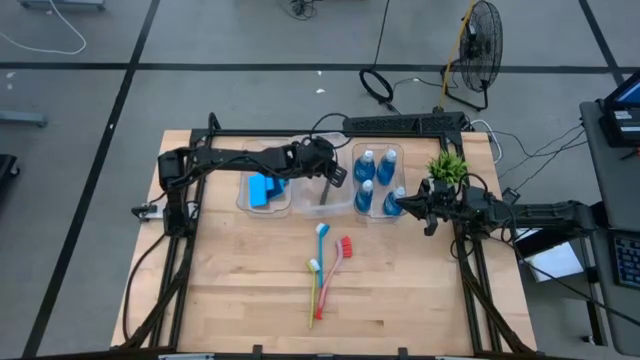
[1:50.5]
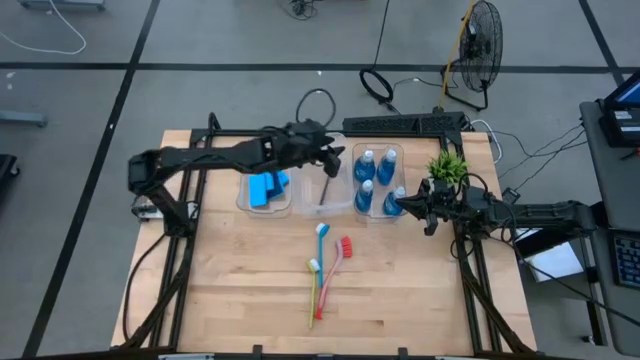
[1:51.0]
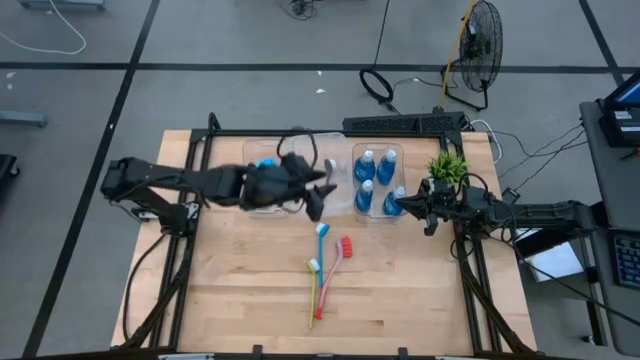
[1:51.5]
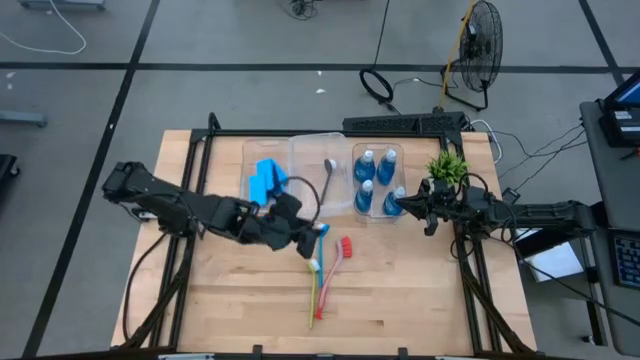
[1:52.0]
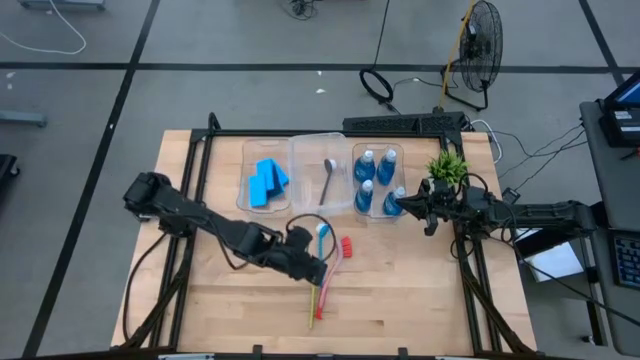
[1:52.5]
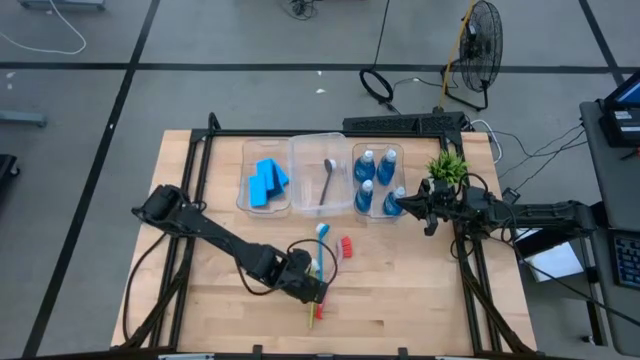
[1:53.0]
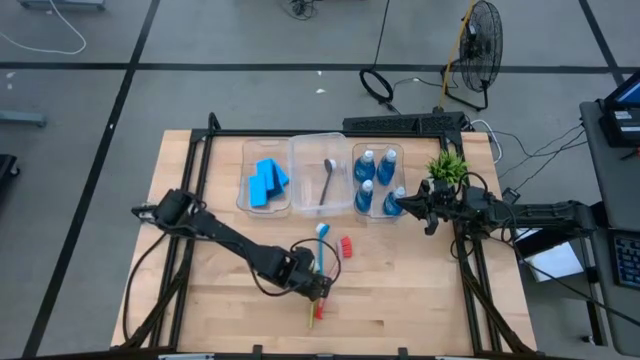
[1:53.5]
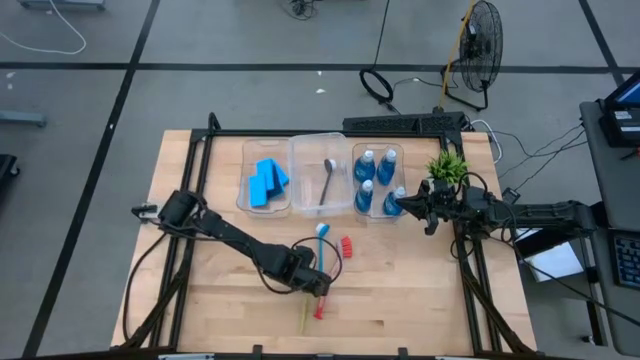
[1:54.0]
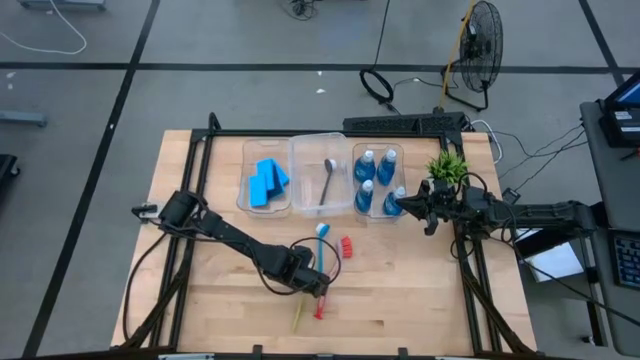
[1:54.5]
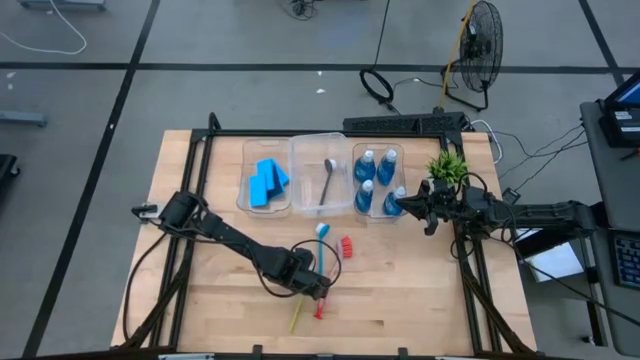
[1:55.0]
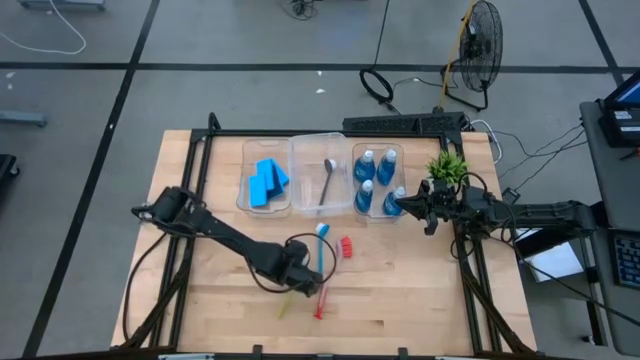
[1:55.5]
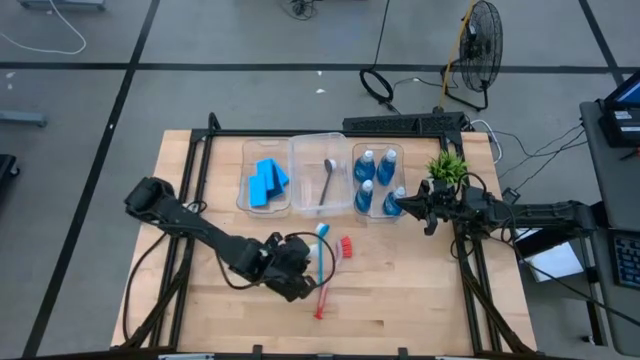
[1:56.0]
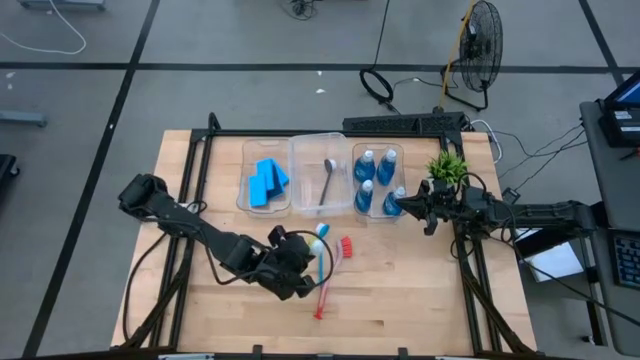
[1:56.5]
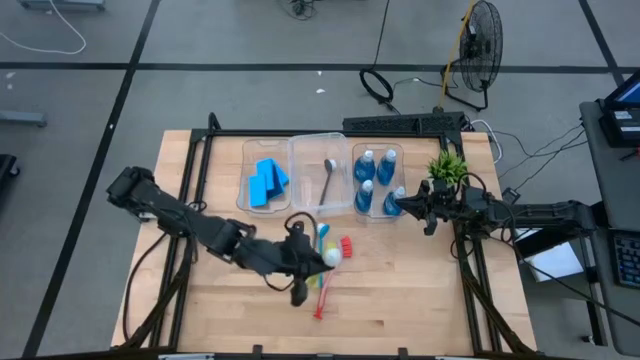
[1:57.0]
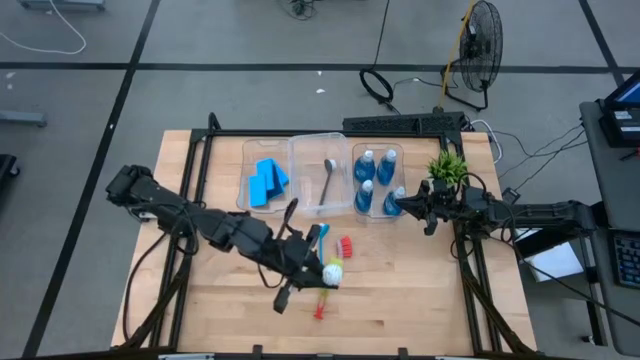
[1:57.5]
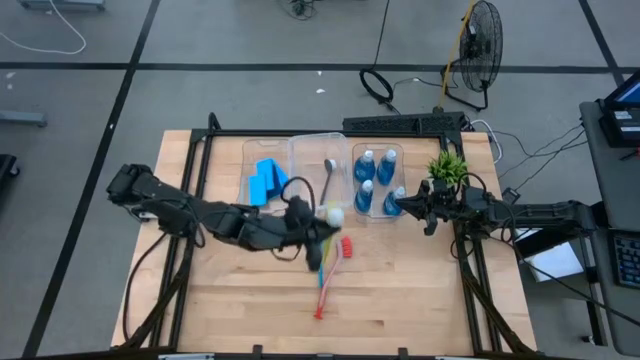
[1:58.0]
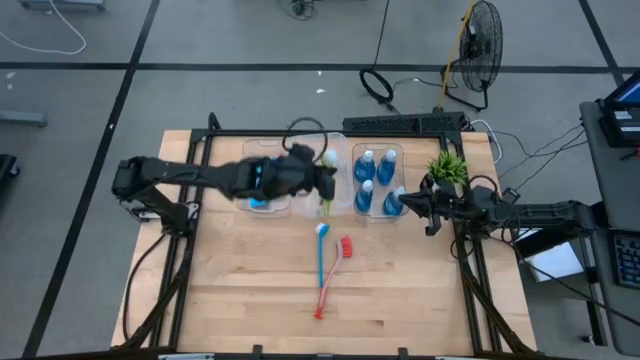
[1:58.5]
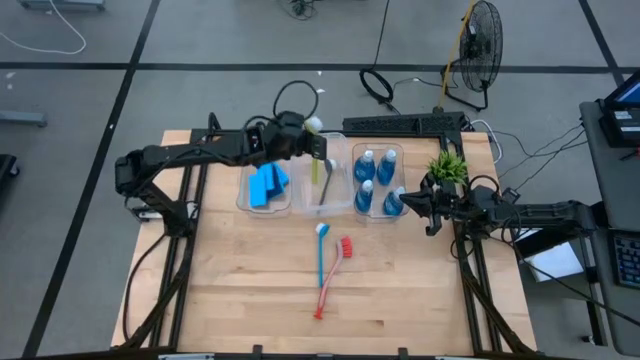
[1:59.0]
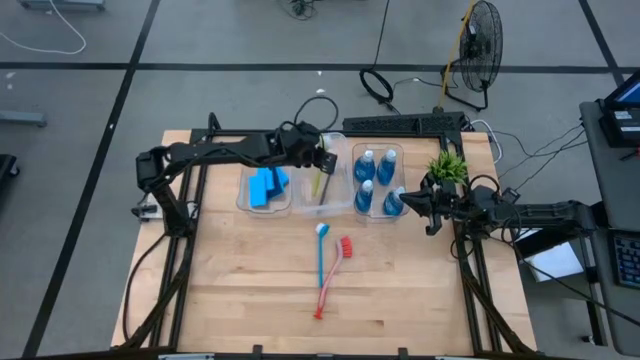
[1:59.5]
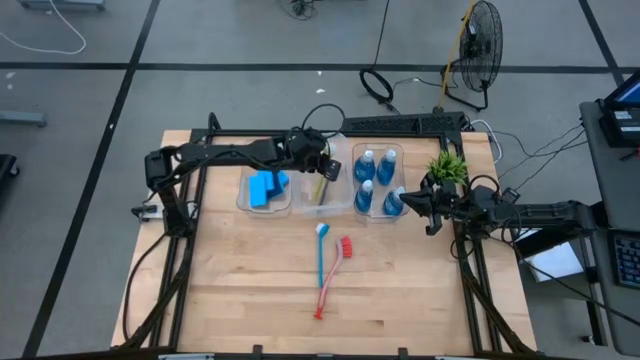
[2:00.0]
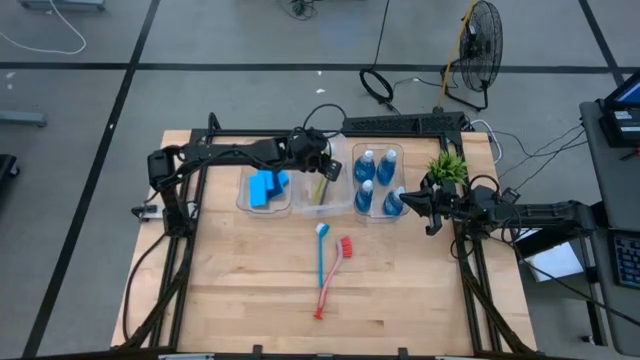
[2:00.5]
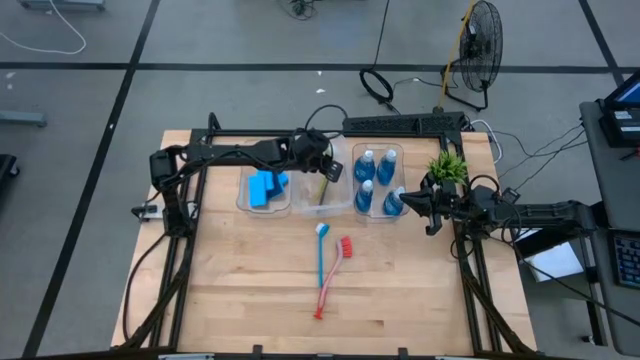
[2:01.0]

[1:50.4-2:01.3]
Task: Pick & Place Kitchen Sink Supplies
Put the light green dishwashing brush into the white bin

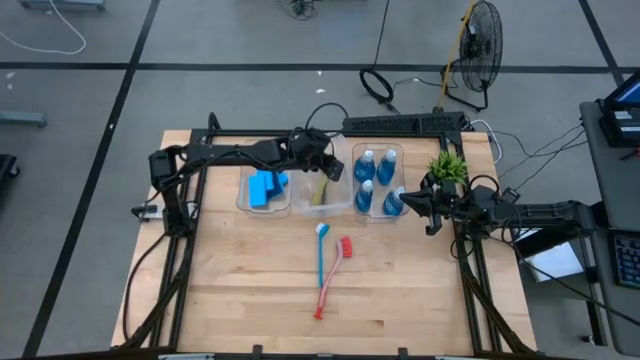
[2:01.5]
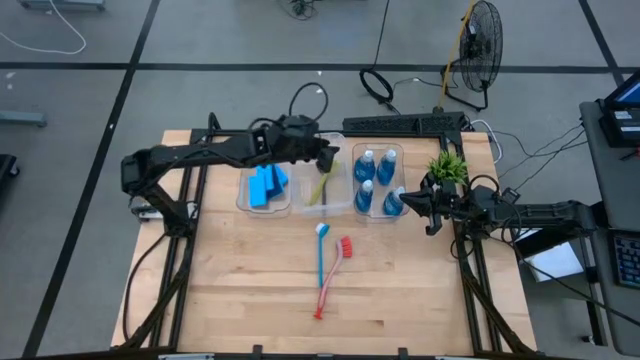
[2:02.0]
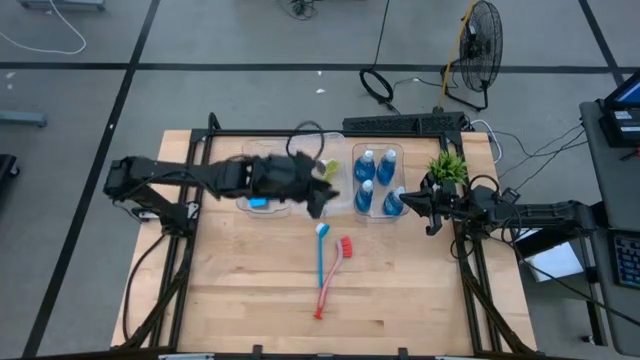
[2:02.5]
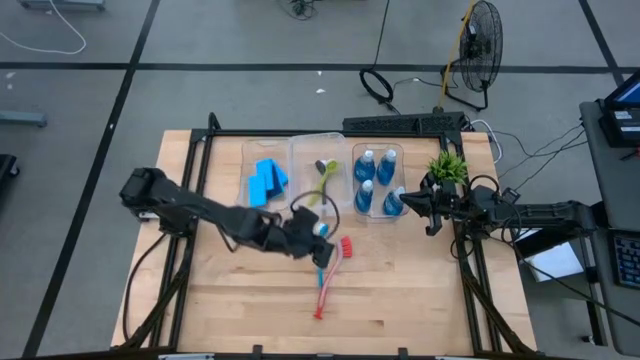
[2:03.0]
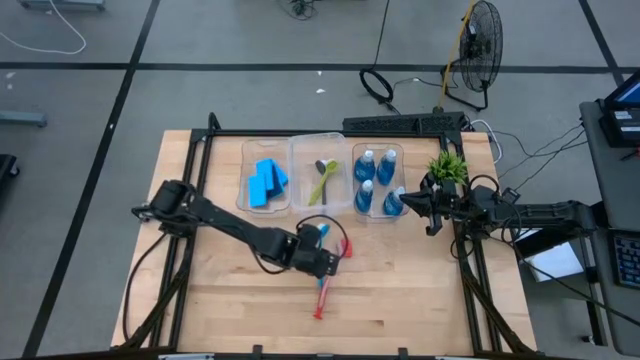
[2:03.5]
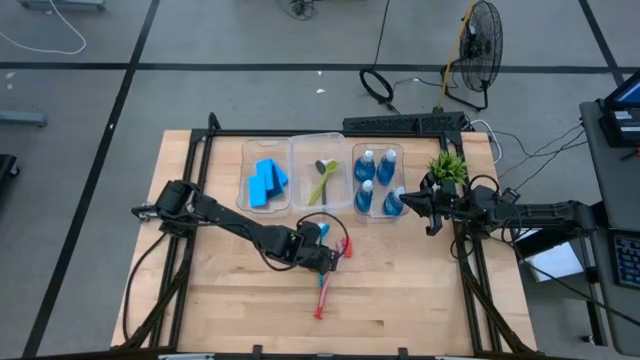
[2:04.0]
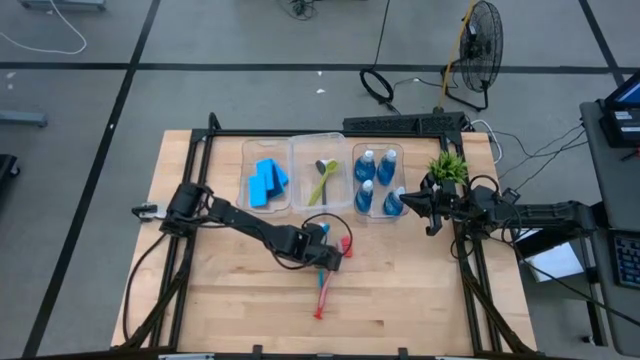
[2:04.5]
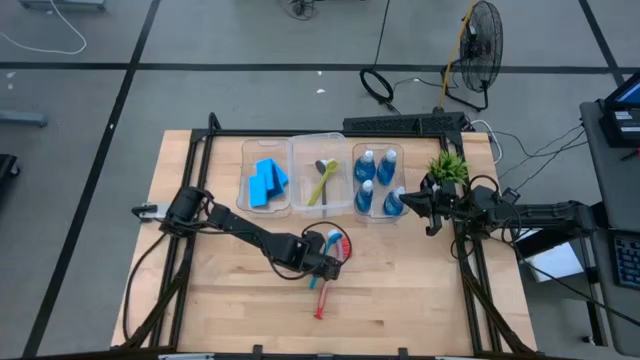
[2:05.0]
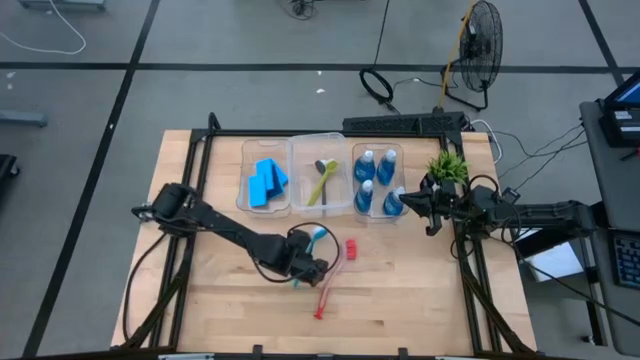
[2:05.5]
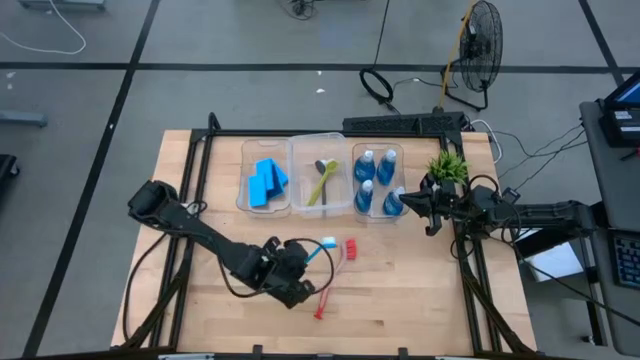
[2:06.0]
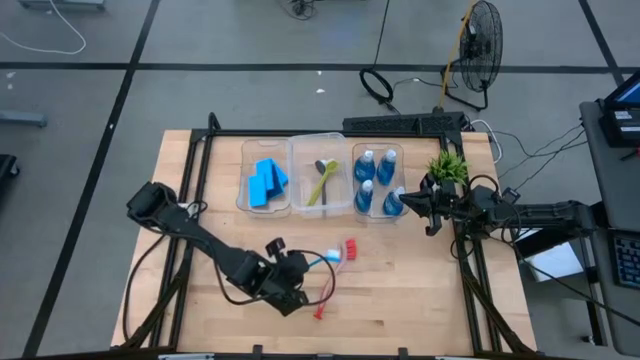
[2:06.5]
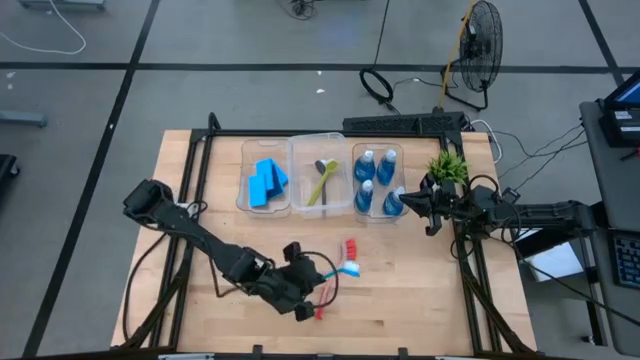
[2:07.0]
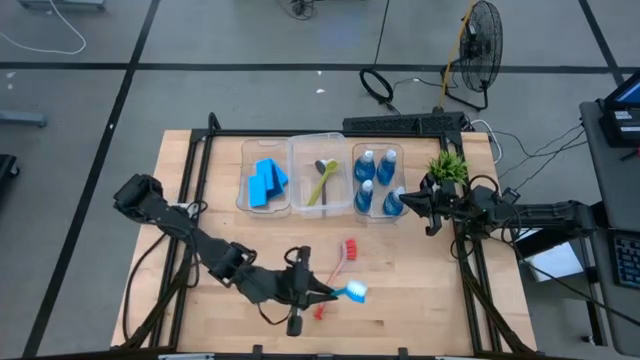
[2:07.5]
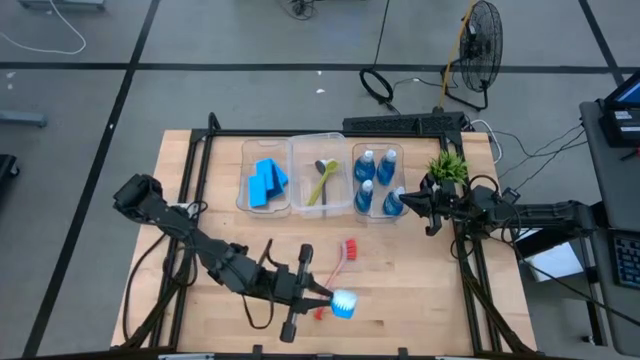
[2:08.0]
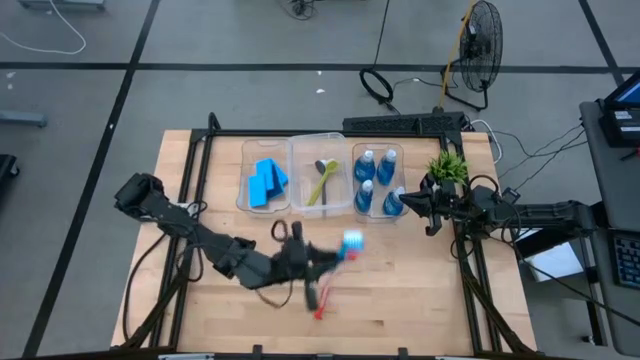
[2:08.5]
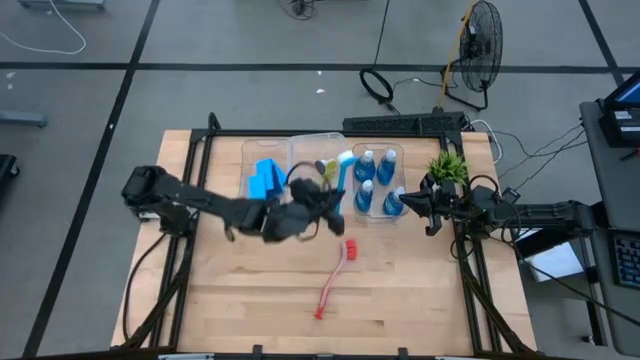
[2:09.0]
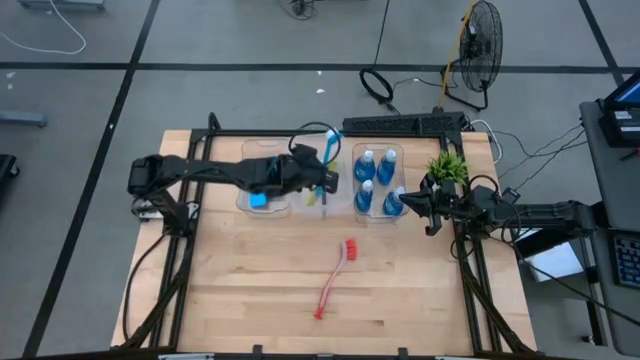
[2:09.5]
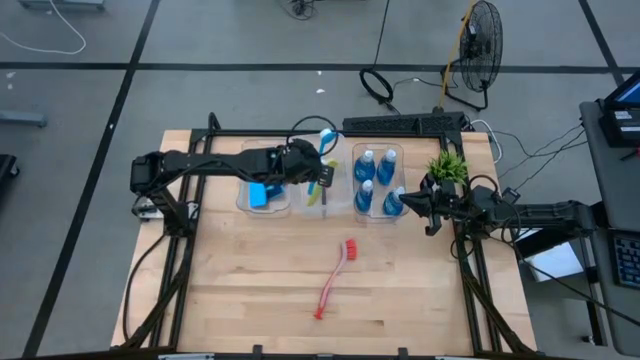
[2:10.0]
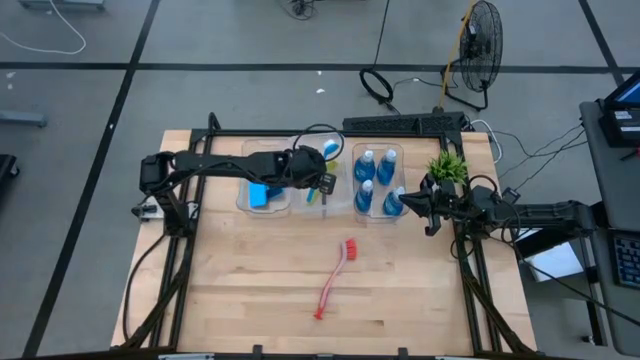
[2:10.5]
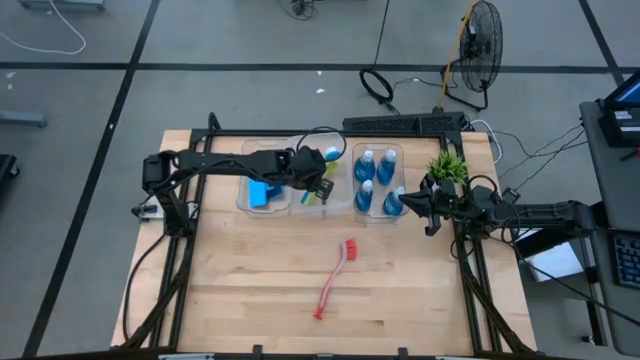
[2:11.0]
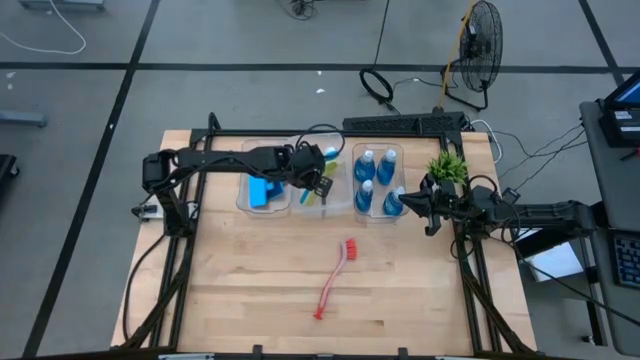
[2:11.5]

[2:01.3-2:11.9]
Put the blue dishwashing brush into the white bin
